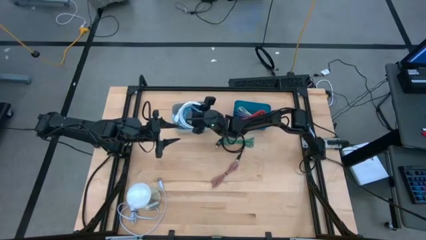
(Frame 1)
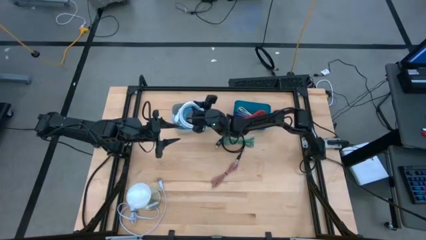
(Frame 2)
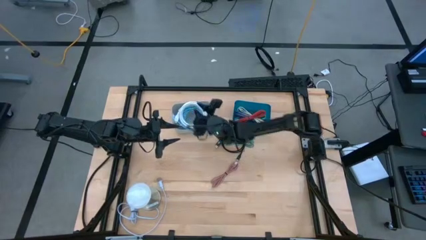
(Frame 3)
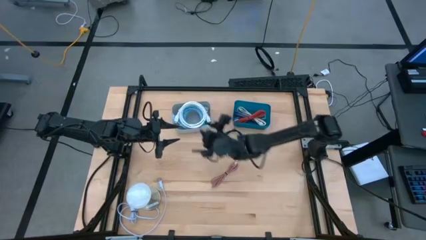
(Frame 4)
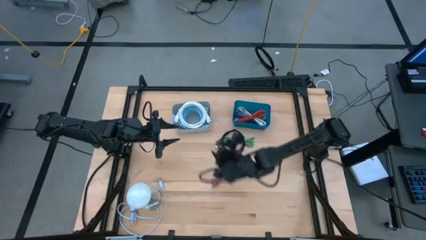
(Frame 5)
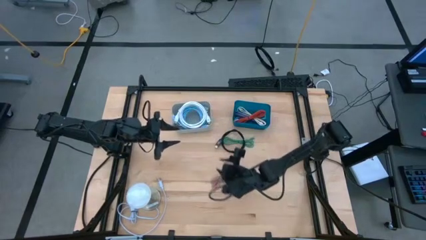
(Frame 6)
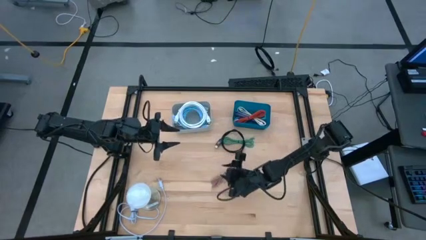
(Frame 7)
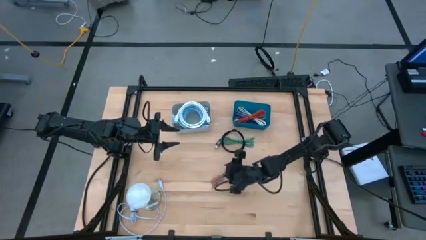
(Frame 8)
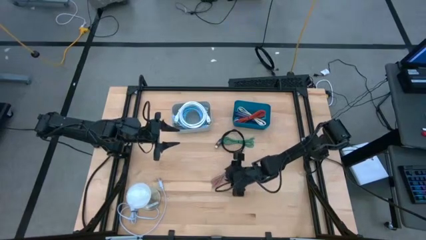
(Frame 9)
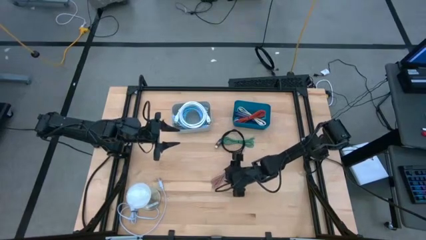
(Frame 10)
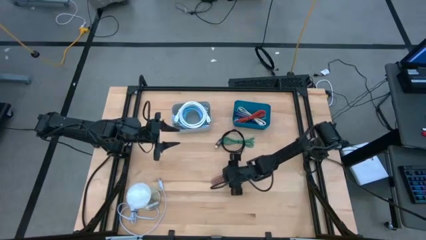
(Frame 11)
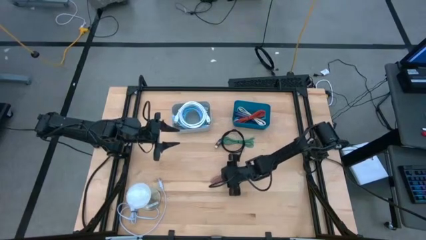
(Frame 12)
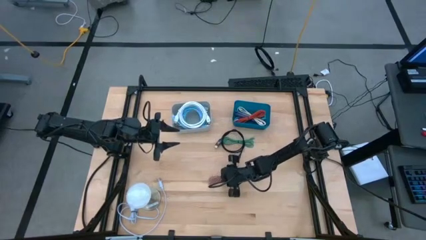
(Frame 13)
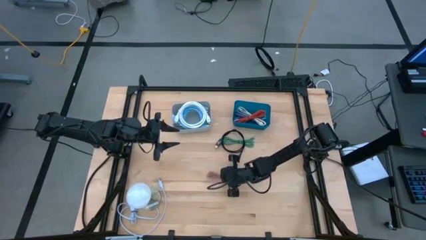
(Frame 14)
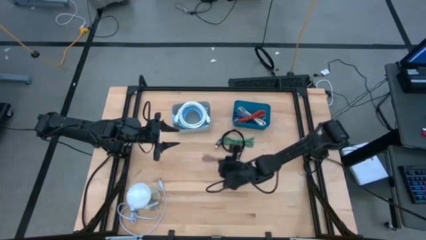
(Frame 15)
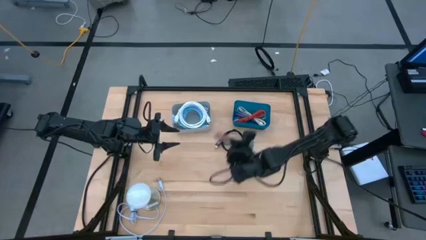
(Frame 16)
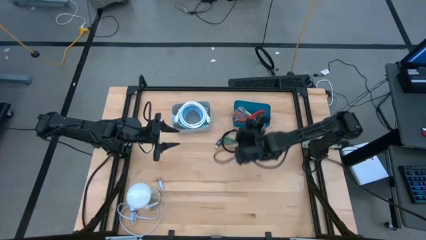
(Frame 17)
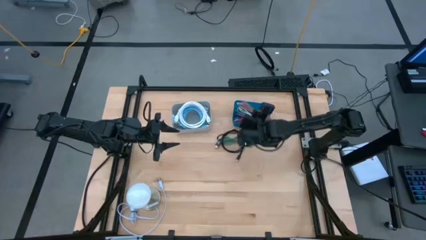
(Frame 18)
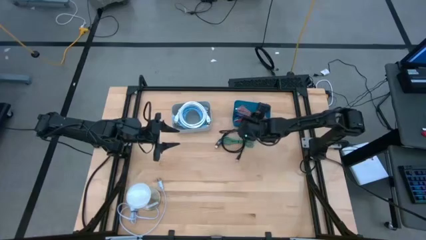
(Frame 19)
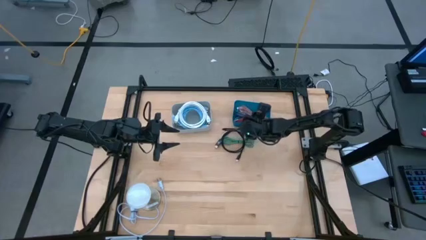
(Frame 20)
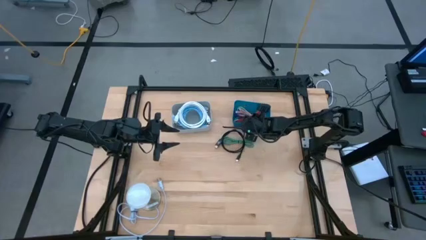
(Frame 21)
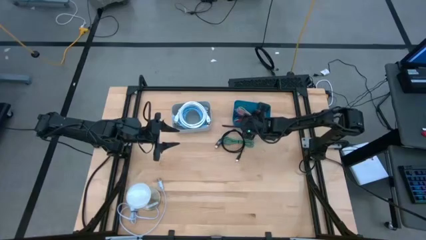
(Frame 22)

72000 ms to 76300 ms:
Task: Pick & Place USB Port
Put the pink charger cable into the blue bin

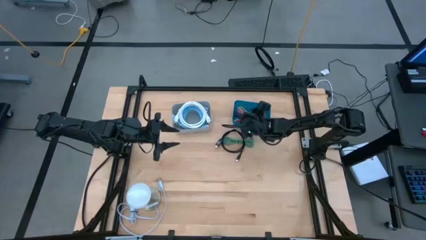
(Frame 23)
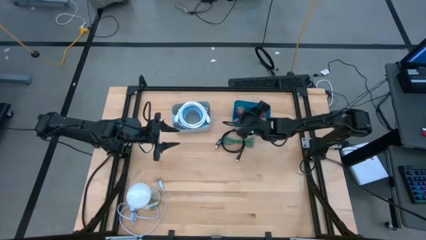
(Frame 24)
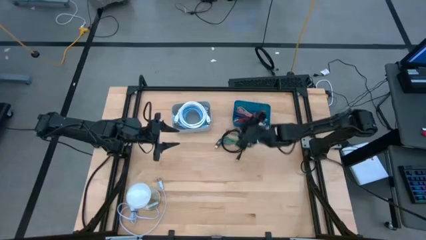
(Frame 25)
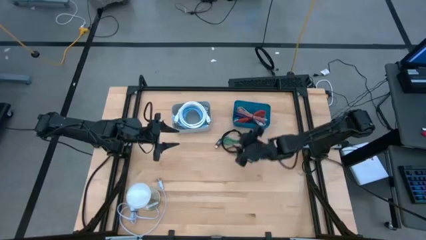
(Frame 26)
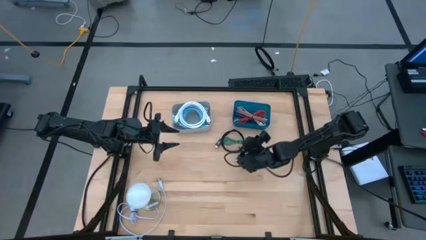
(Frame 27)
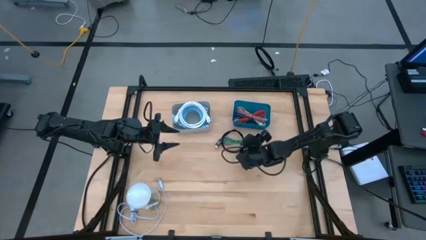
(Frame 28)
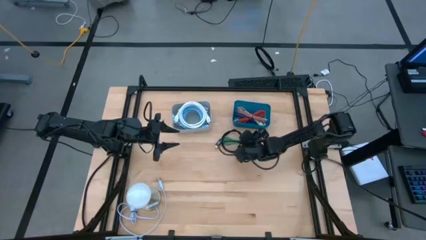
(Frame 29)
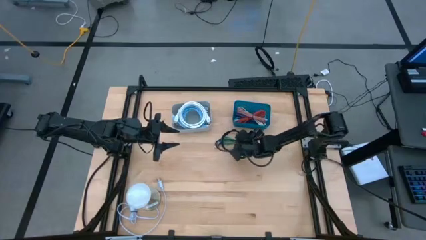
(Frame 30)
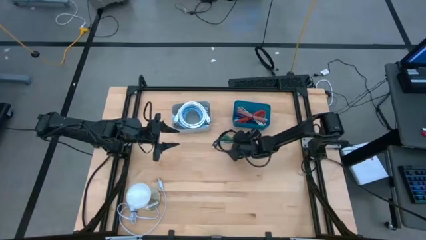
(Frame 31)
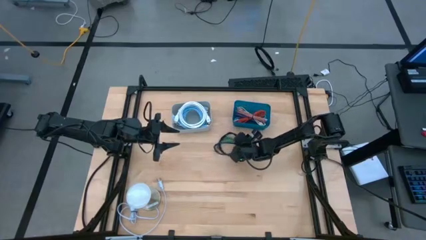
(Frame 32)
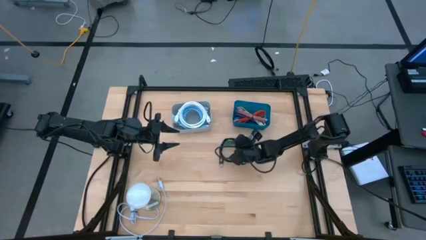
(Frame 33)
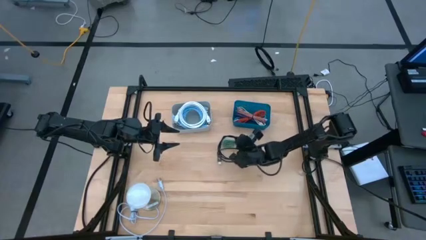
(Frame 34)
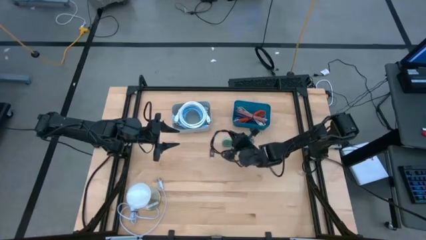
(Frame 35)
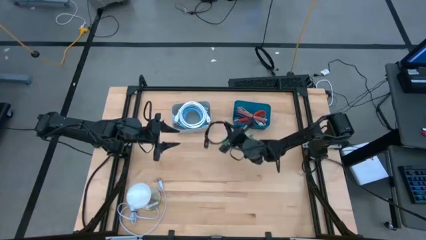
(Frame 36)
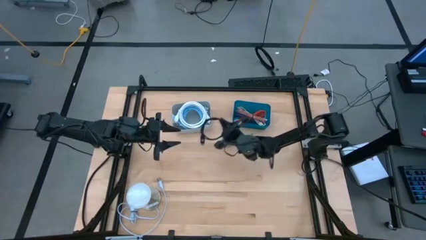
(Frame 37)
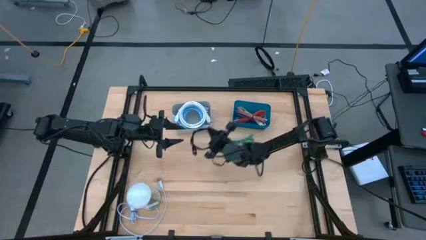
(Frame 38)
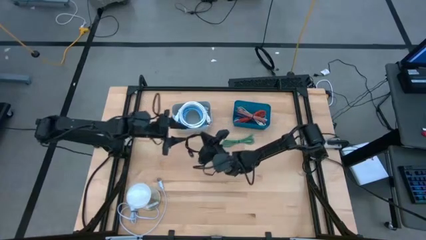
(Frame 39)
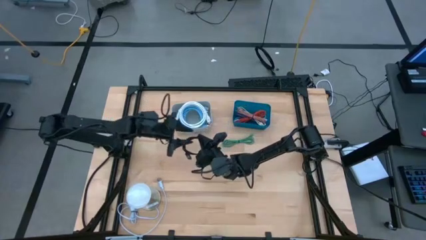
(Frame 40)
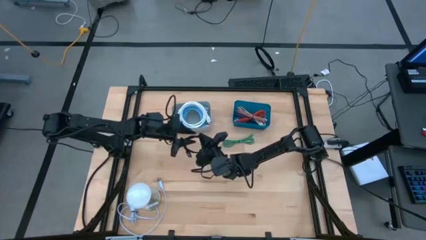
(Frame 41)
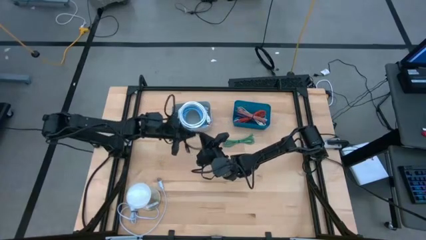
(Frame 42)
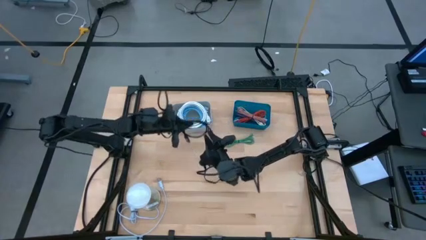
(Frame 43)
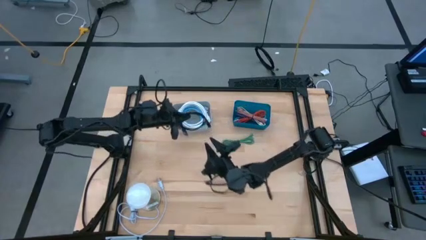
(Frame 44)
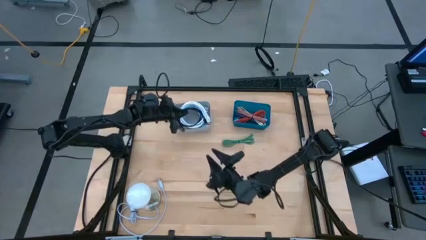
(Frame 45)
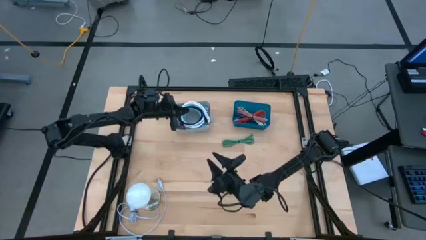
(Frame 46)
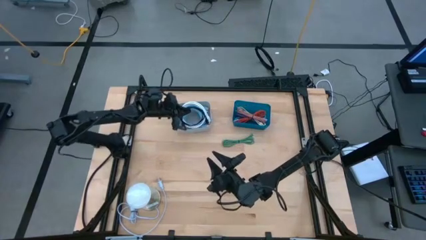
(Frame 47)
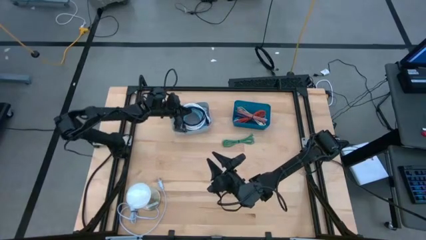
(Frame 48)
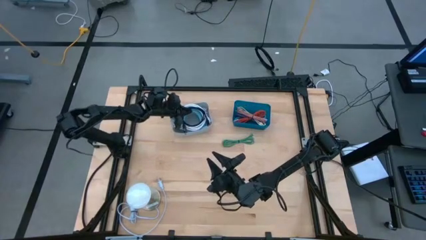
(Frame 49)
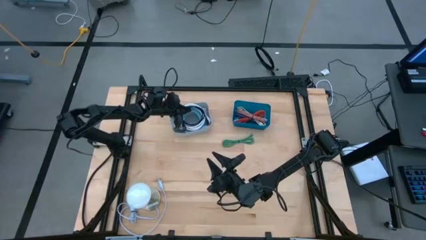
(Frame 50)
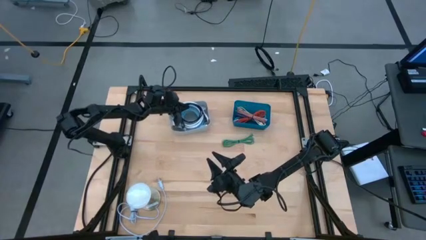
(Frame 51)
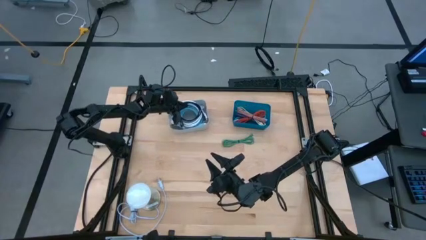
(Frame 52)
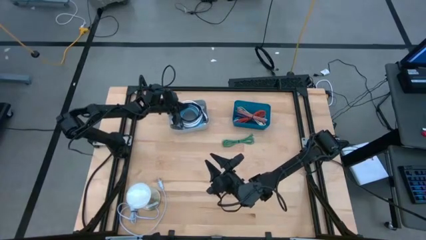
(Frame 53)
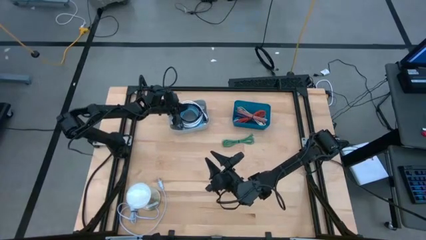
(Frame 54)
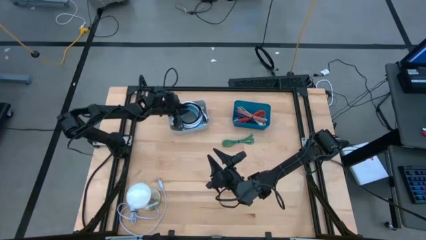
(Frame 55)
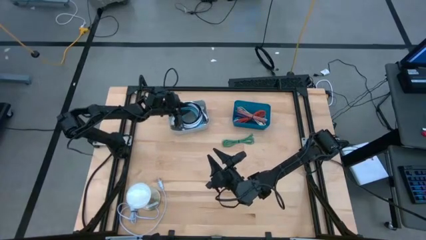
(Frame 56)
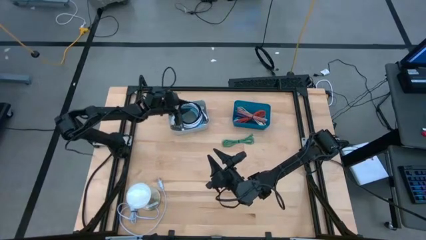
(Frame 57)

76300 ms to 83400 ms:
Put the black hdmi cable into the gray bin

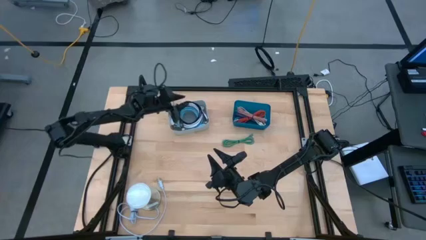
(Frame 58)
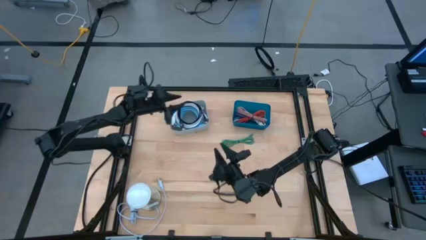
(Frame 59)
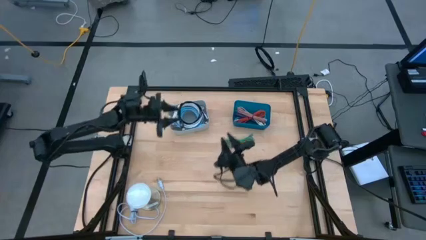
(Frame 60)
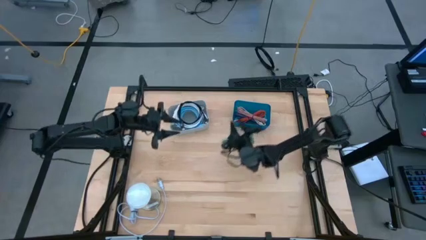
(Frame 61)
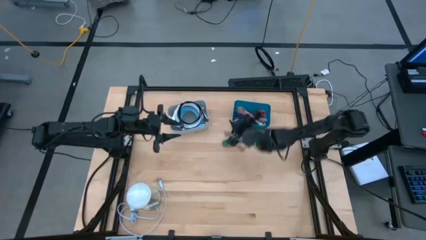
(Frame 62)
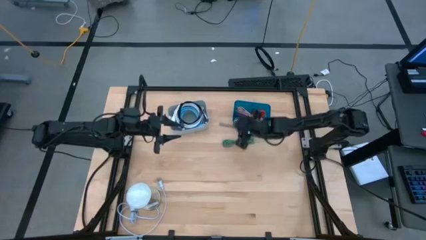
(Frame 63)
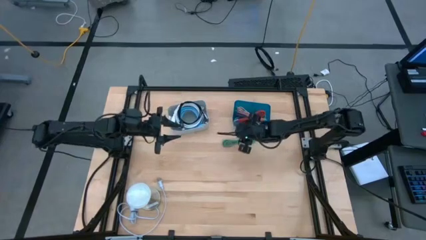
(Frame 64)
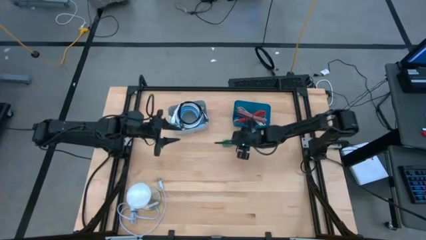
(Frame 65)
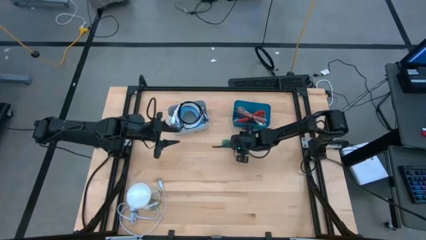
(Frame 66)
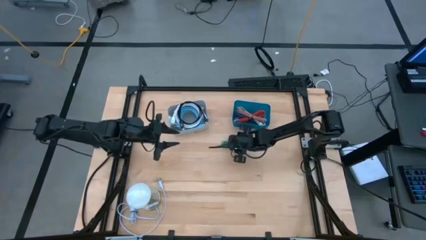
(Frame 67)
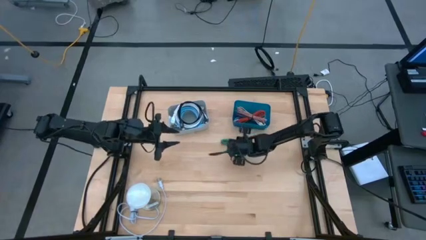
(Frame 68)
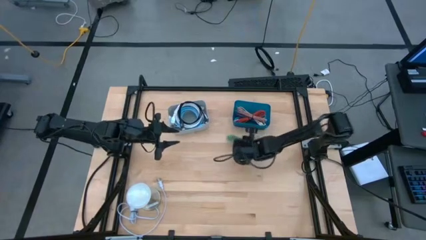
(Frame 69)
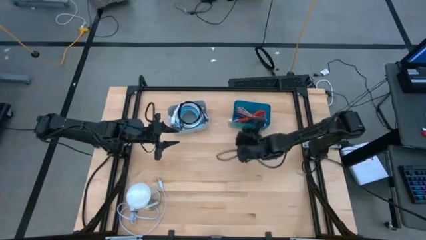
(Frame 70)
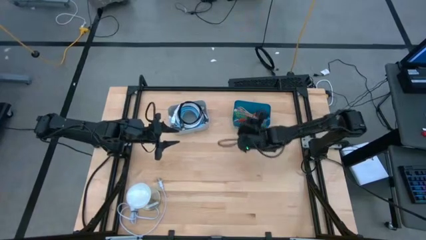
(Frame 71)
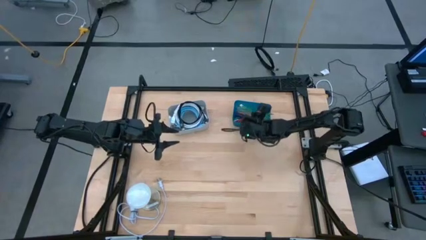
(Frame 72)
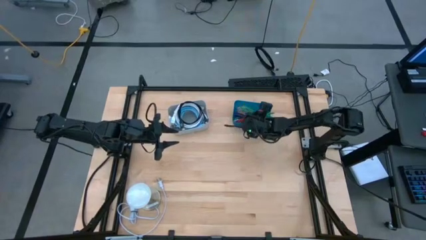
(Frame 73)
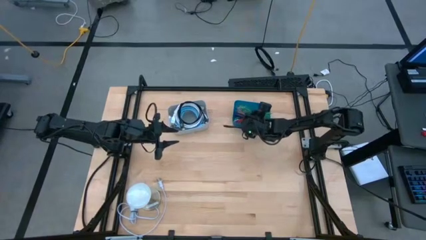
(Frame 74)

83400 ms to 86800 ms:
Put the green charger cable into the blue bin
